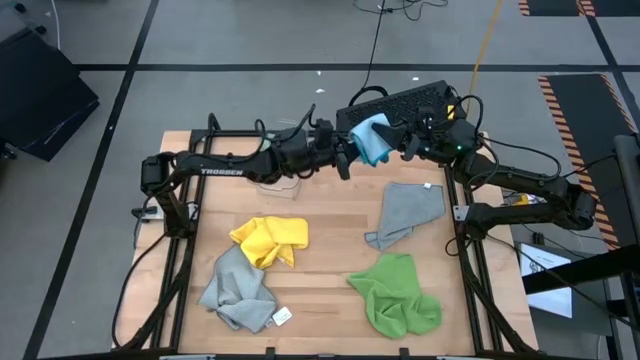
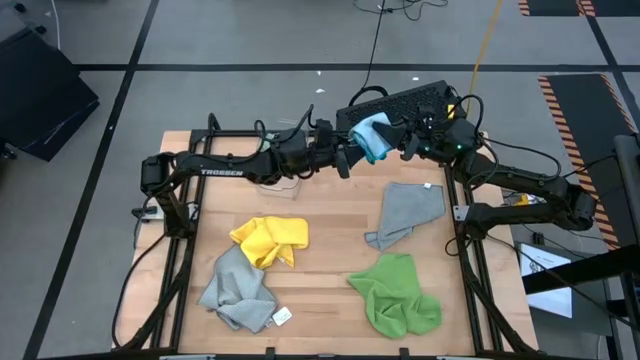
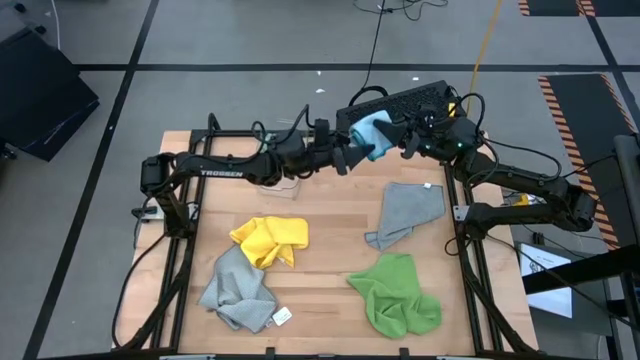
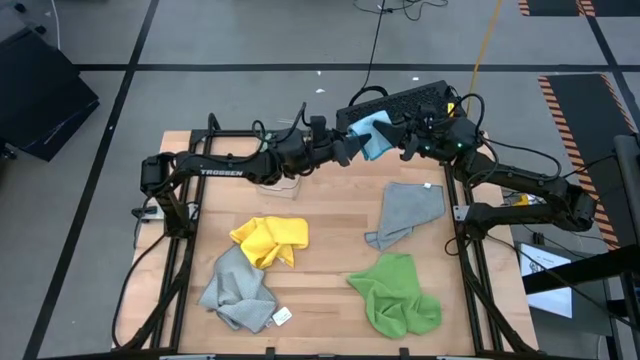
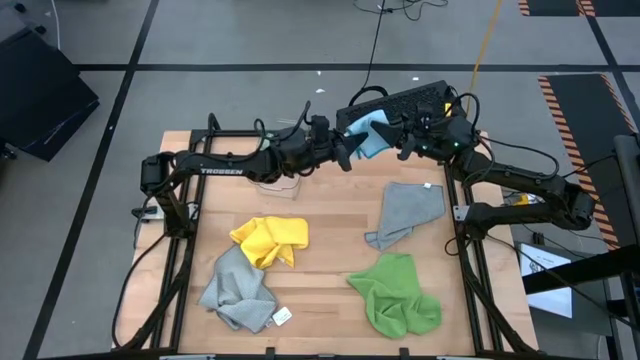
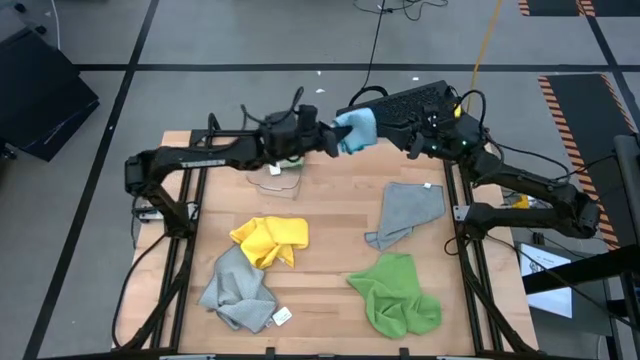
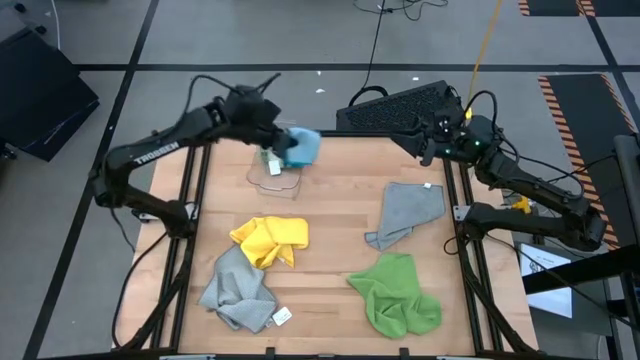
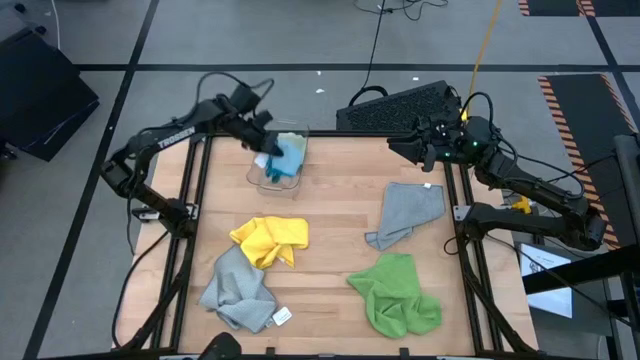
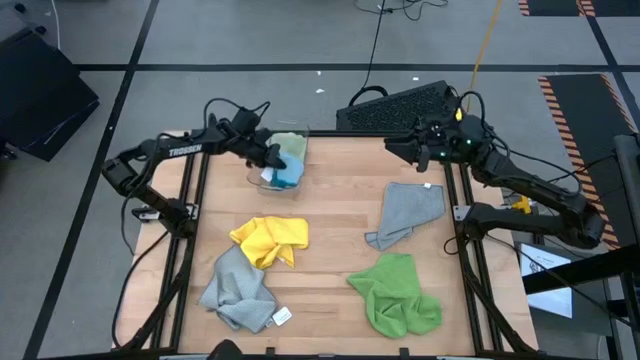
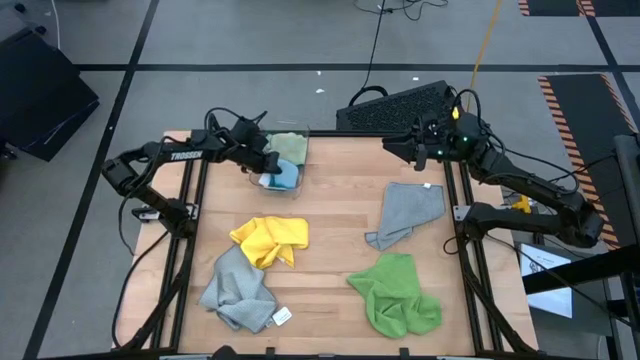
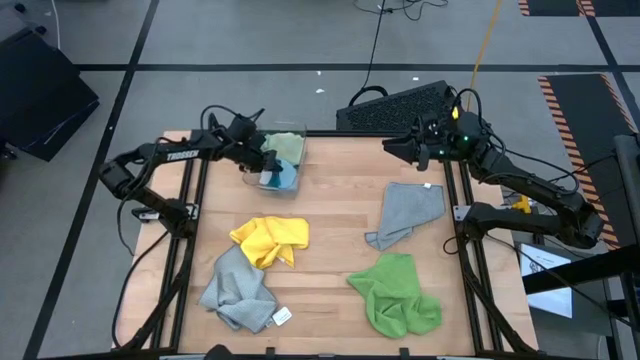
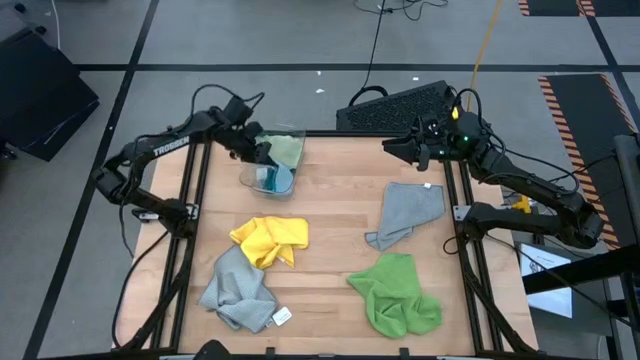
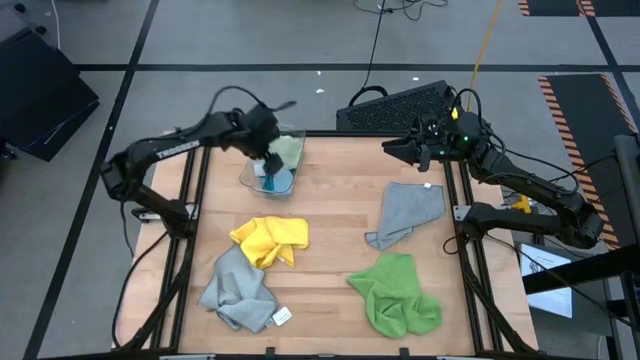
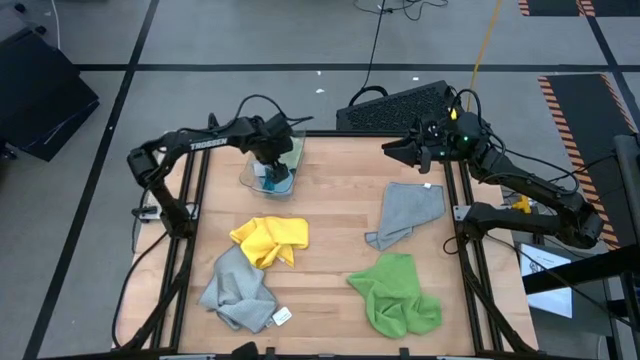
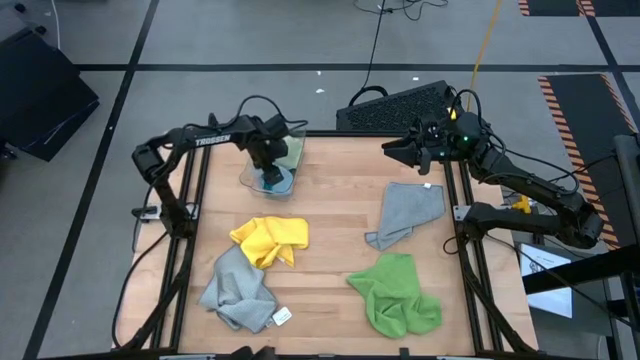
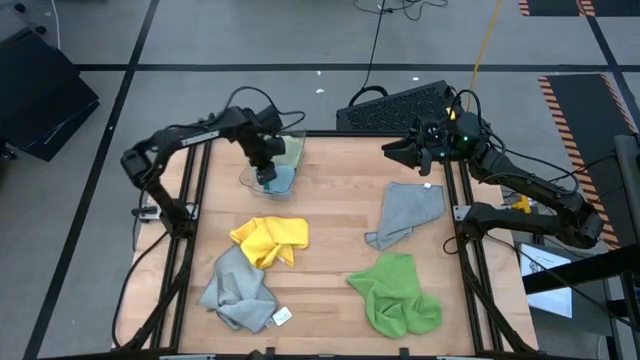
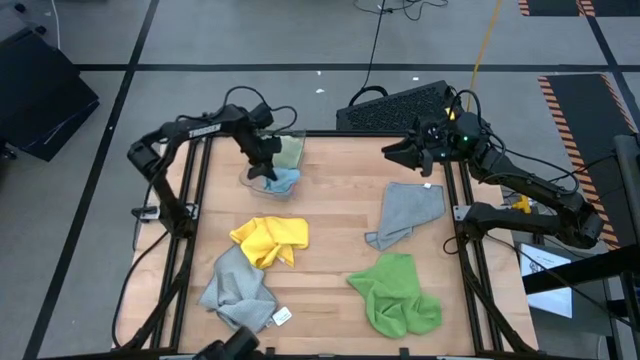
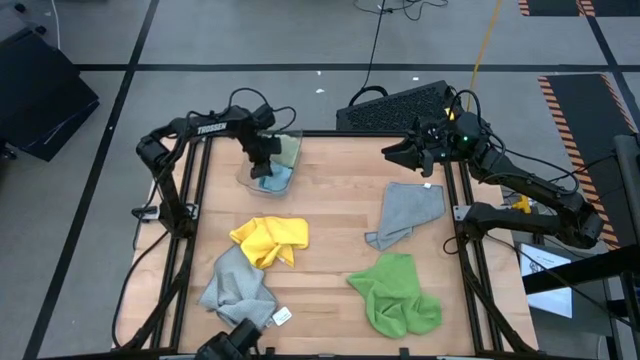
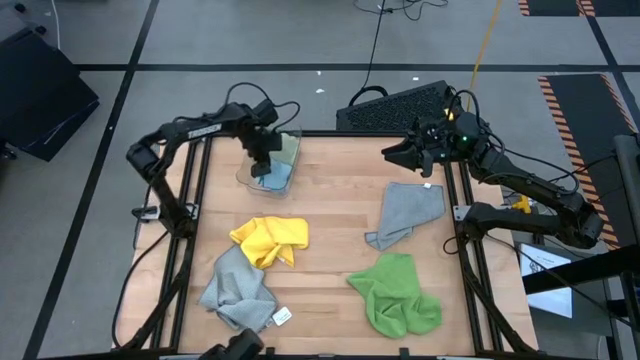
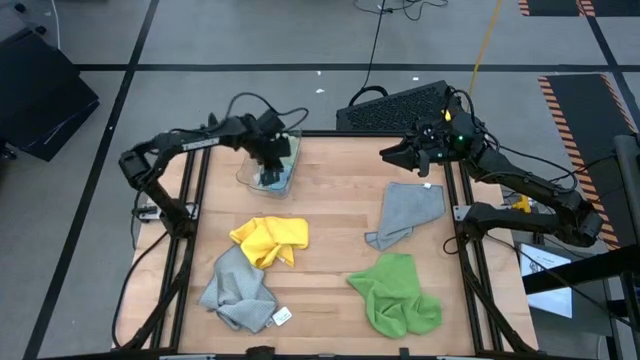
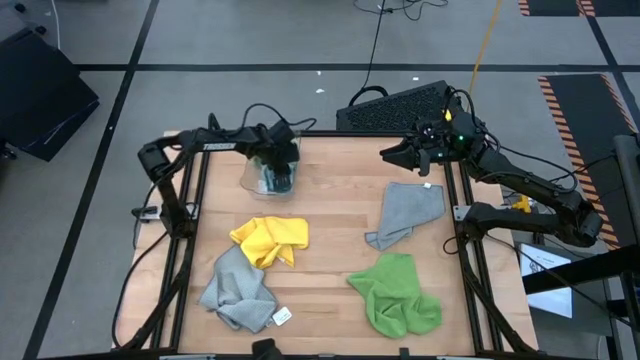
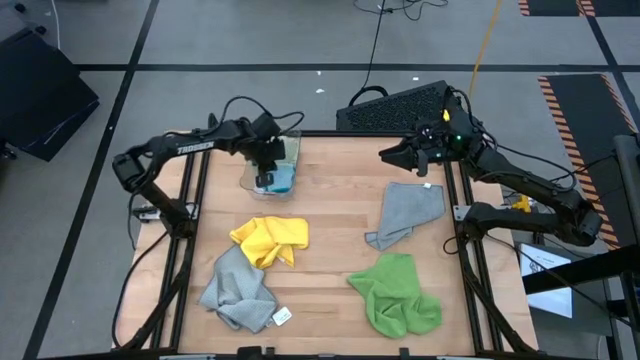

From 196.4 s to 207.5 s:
Task: Fold microfiber towels
Put the blue microfiber cloth into the transparent bin

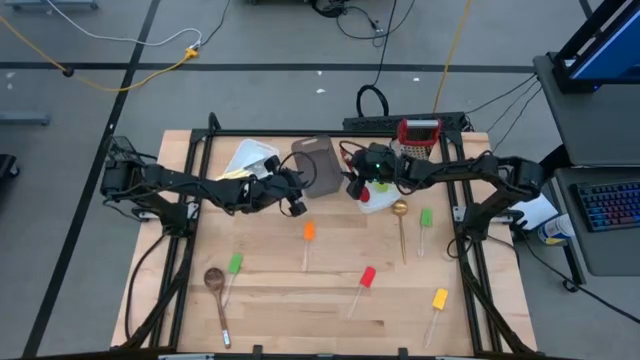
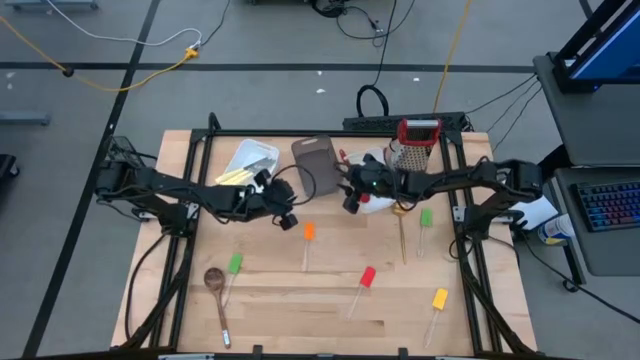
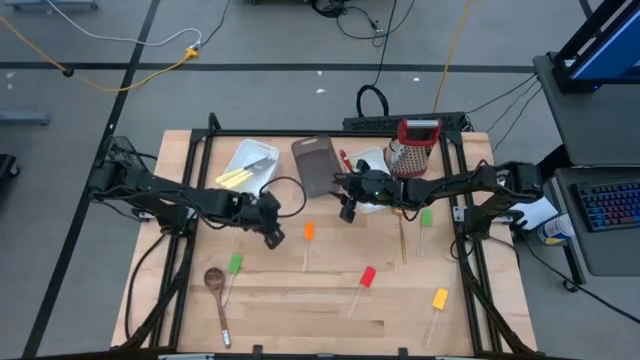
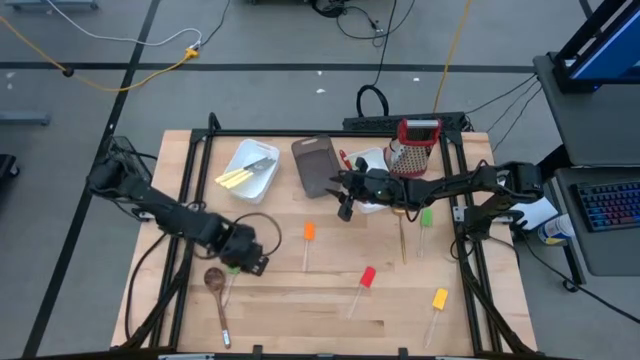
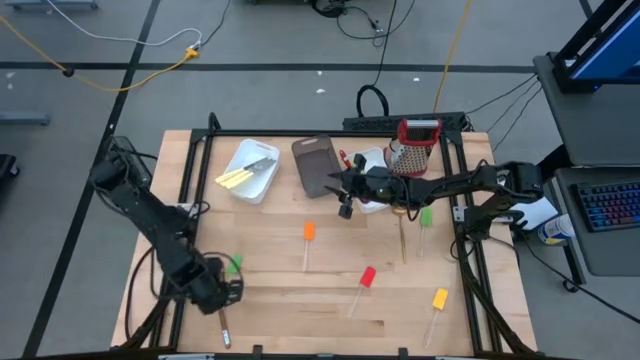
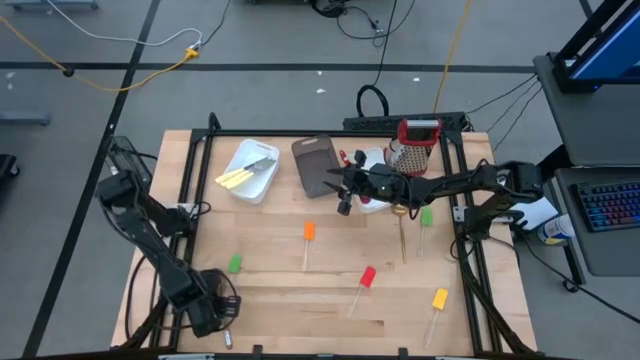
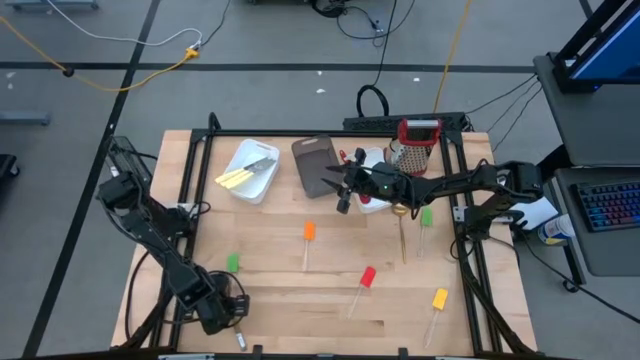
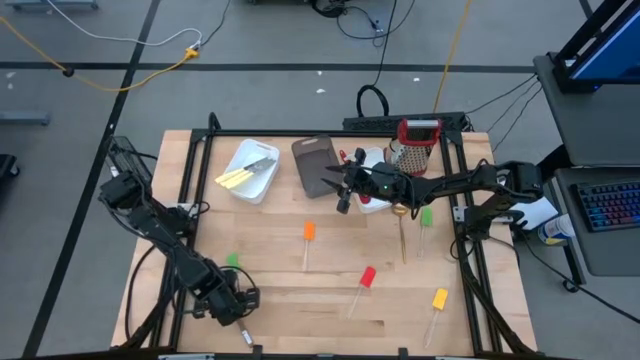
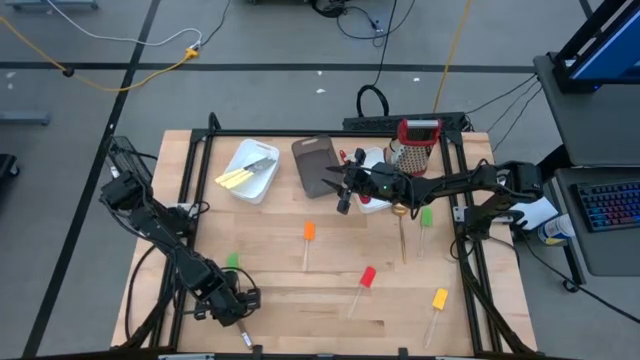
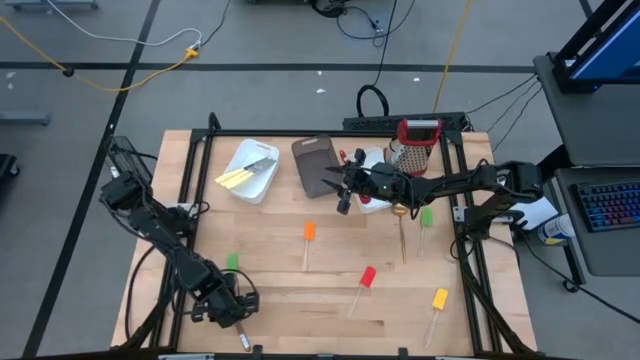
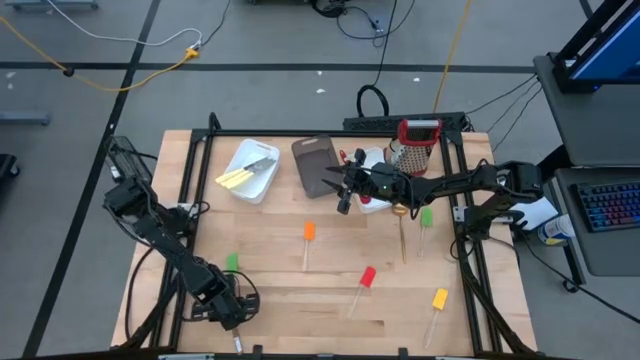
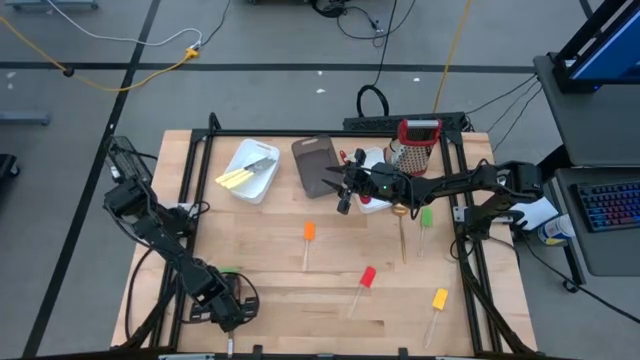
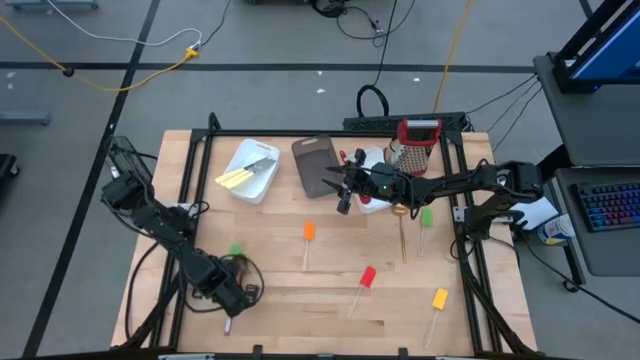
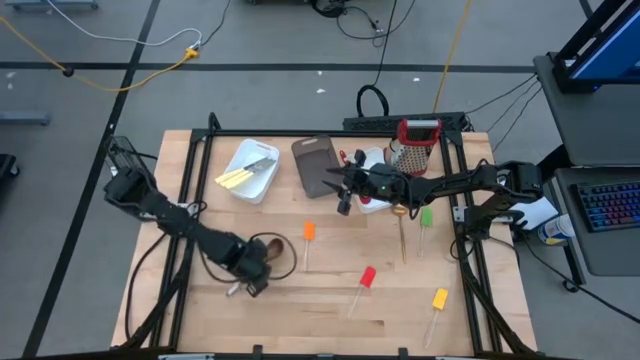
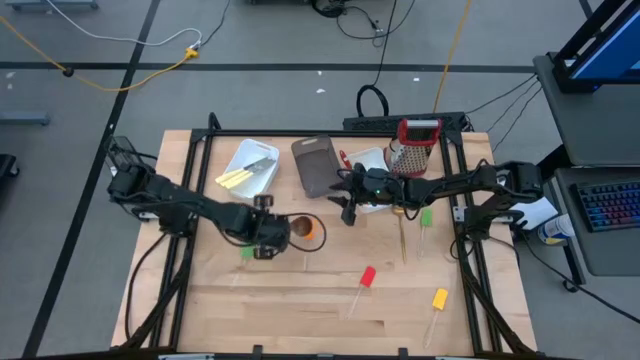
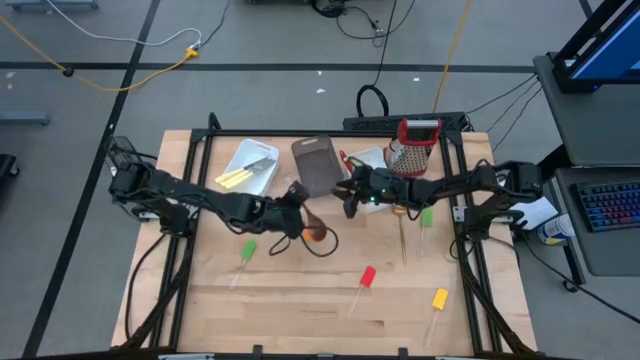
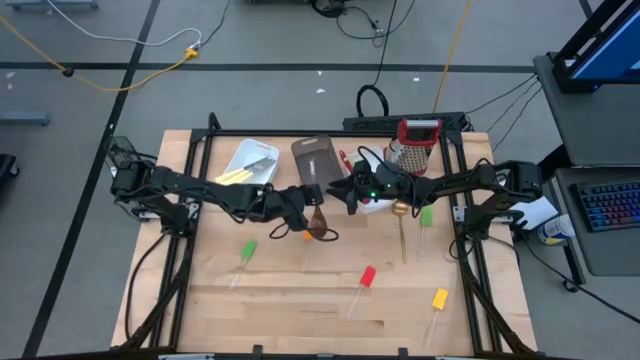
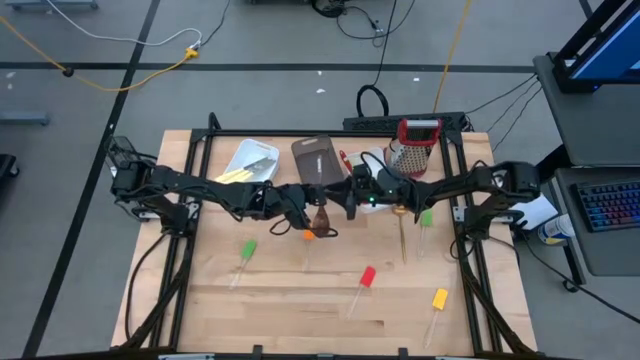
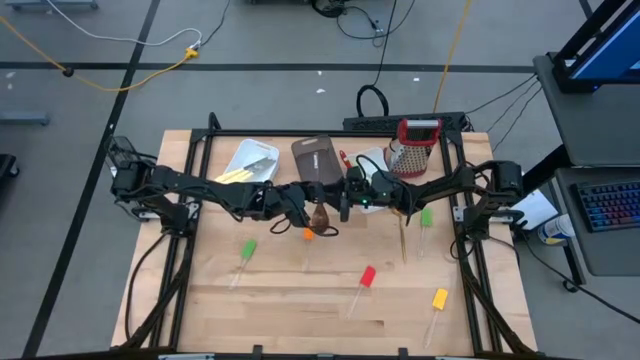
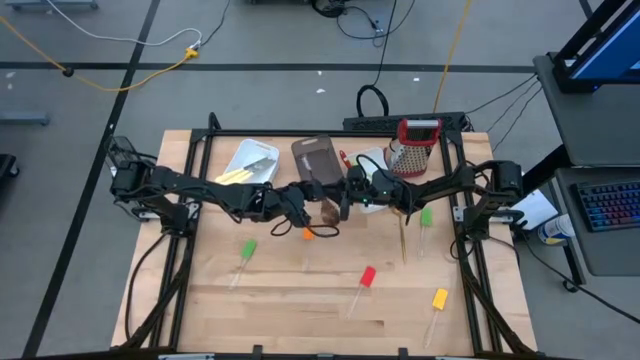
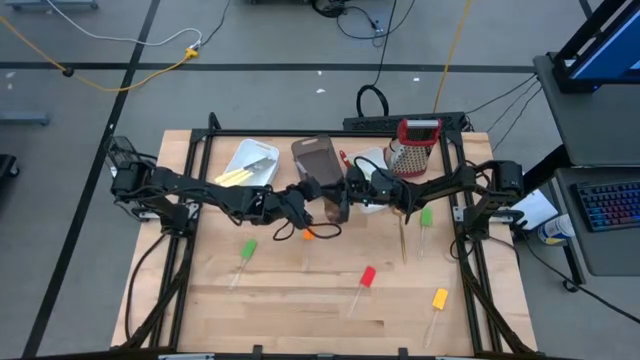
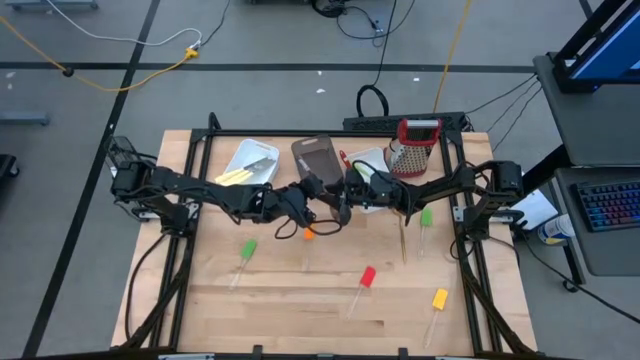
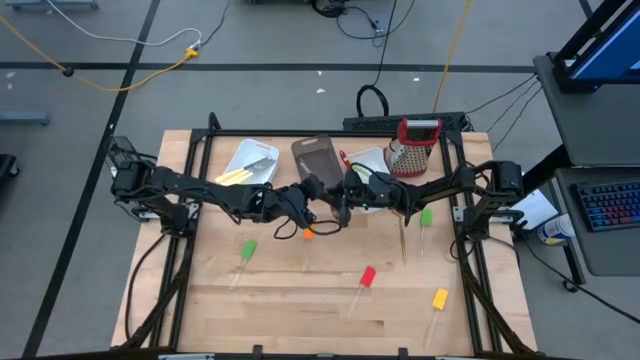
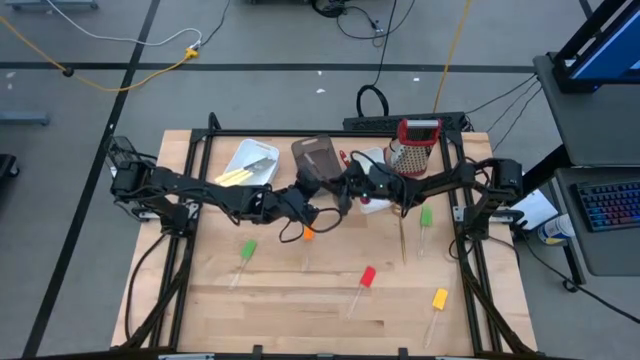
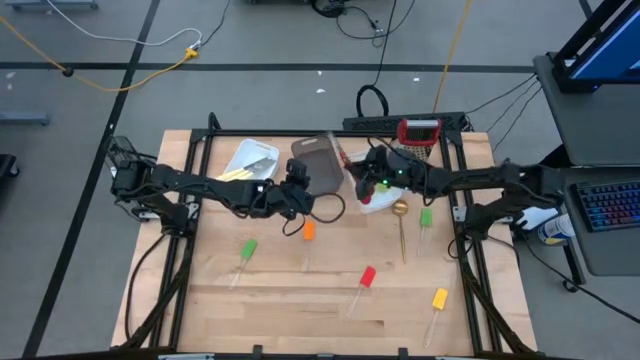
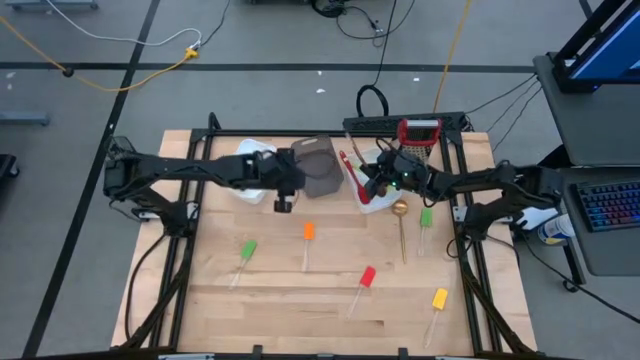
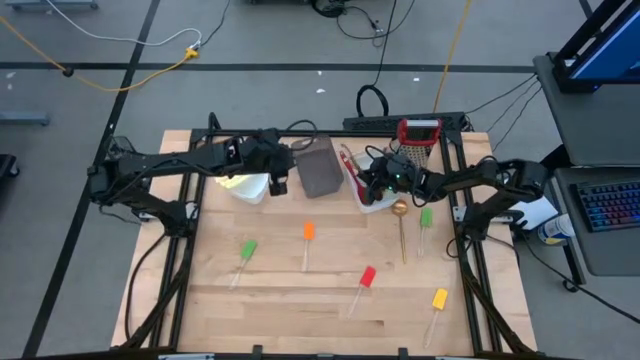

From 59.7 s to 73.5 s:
Task: Pick & Place Kitchen Items
Put the wooden spoon into the right white bin
